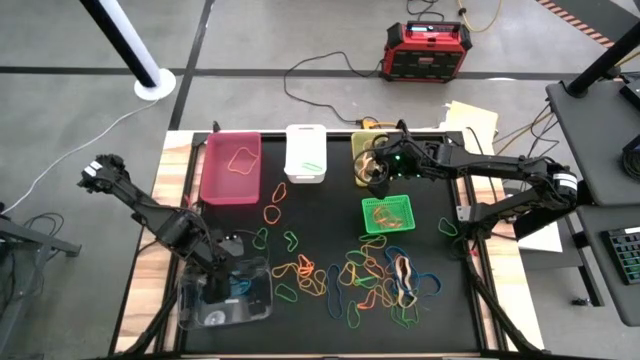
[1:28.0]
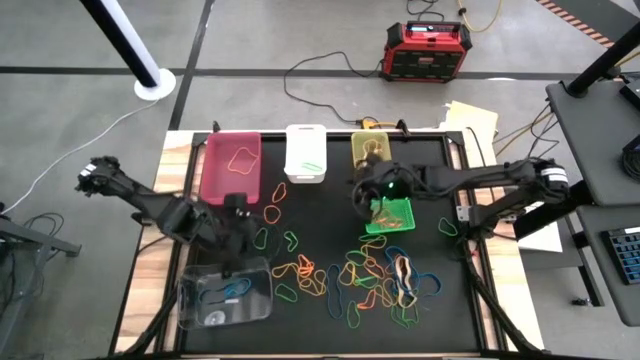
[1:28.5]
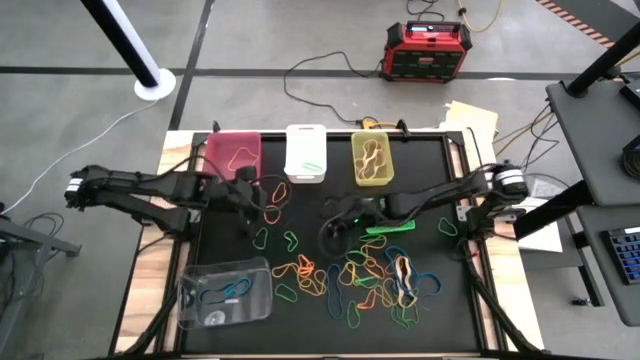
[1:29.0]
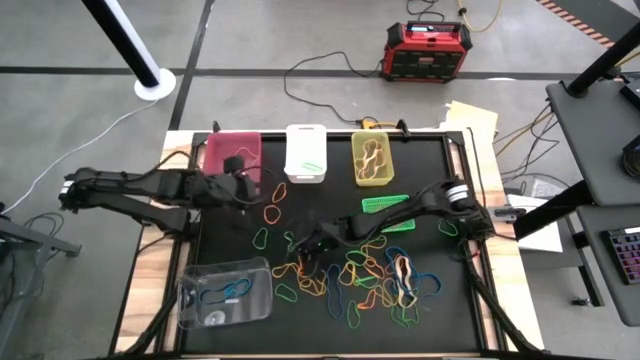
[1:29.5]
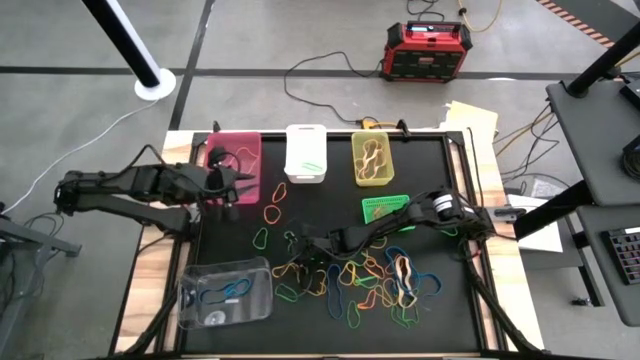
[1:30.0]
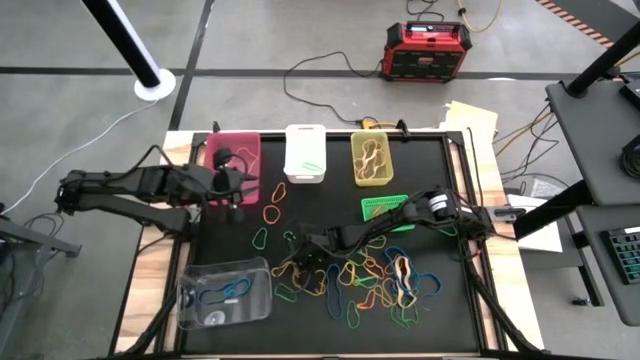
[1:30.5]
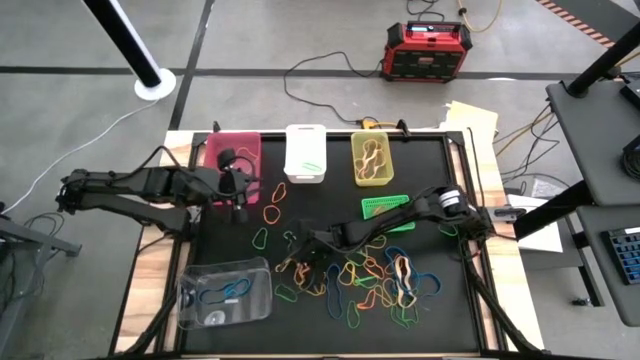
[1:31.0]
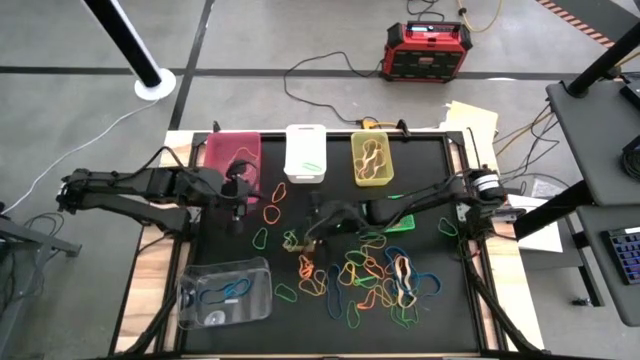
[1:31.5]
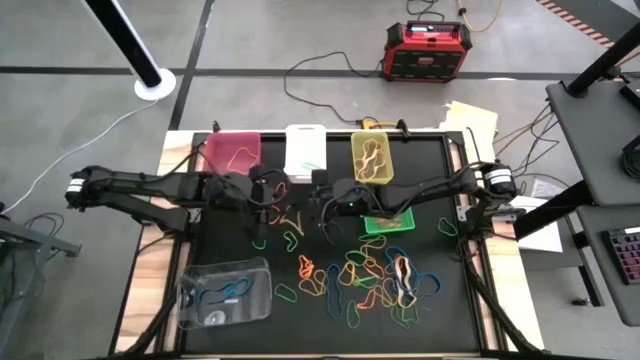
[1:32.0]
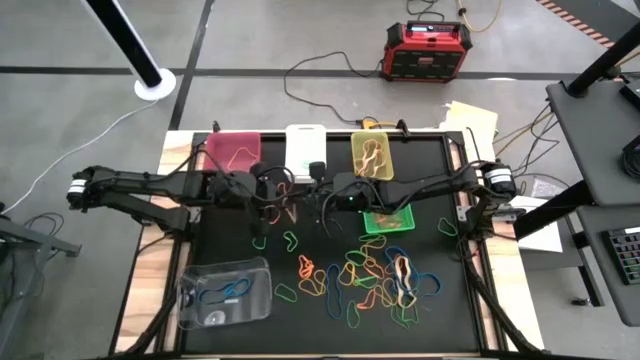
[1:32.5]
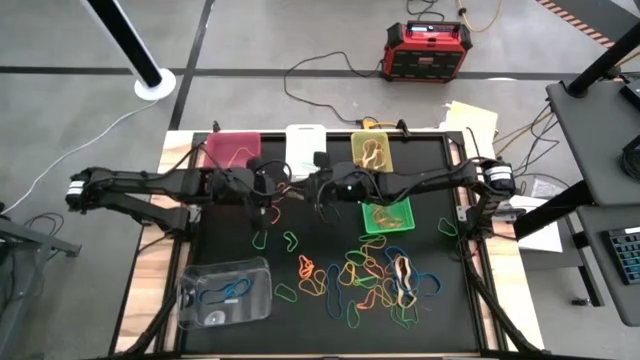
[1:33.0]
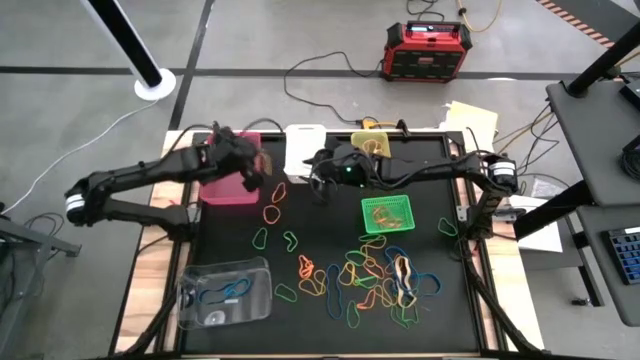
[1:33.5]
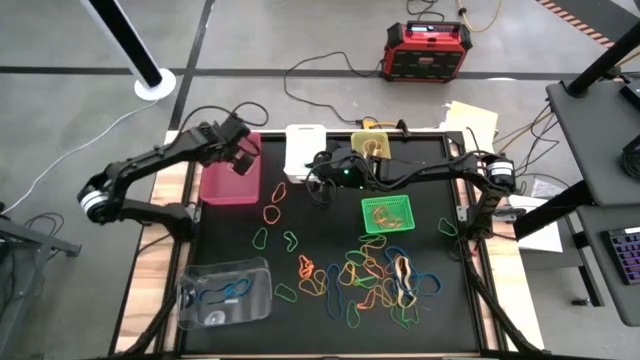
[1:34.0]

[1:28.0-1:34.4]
Task: Sort rubber bands into baskets
Put the yellow rubber band into the pink bin

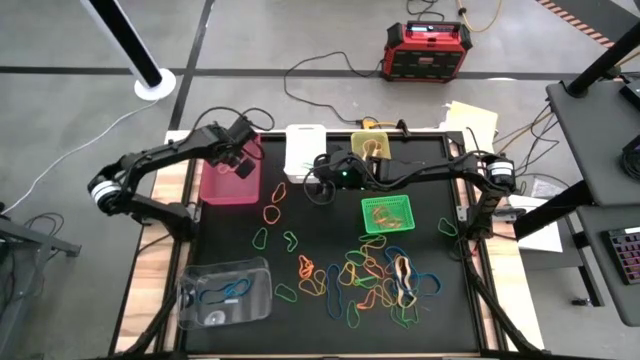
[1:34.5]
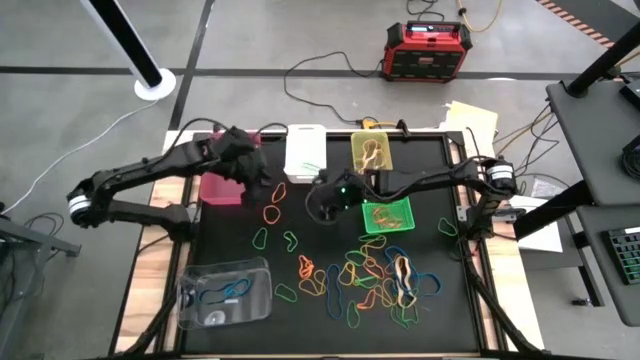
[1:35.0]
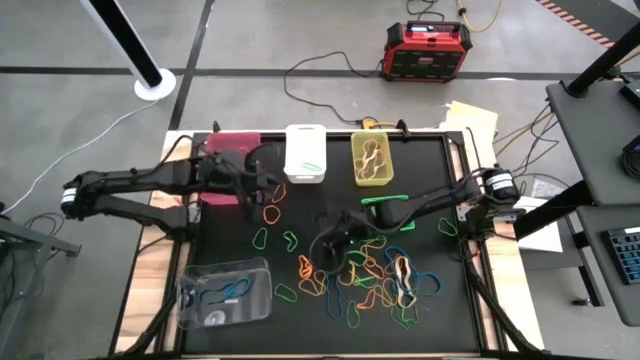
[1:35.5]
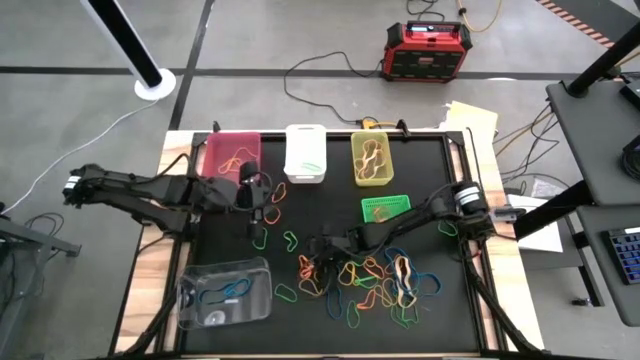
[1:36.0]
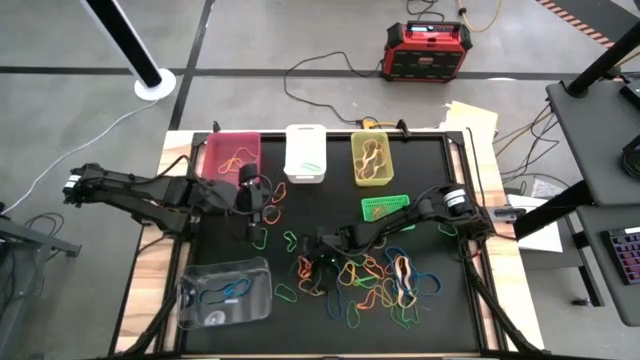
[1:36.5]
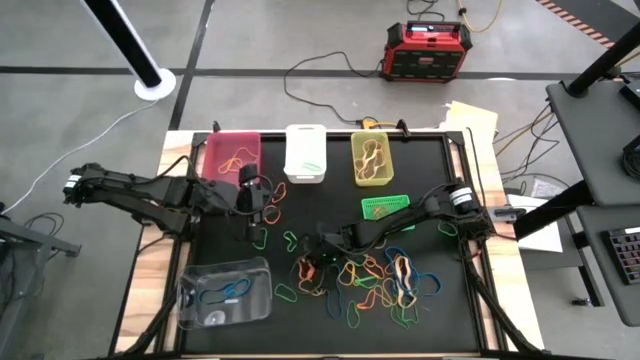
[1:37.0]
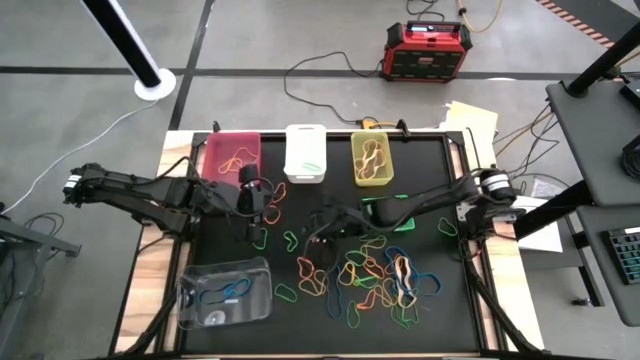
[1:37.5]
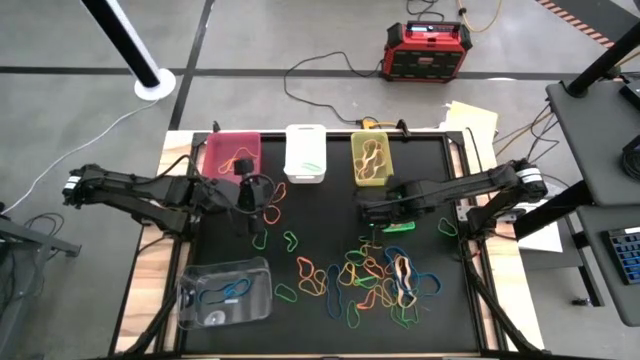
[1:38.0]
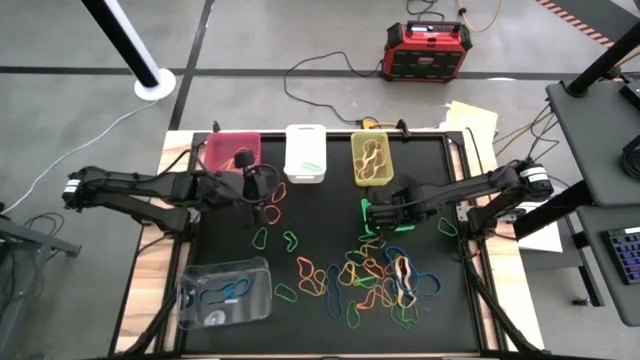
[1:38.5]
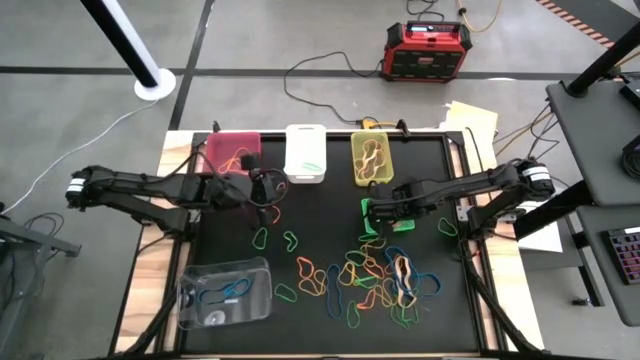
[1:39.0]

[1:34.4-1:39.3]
Put the orange rubber band into the green bin

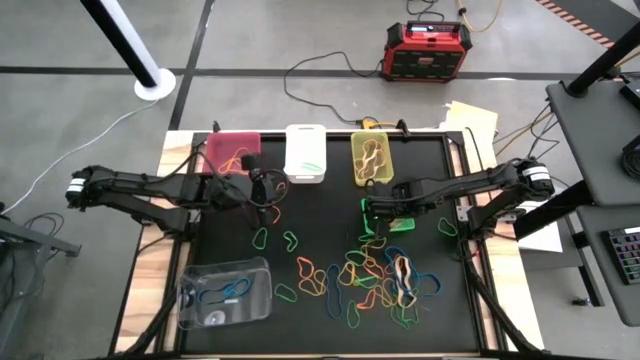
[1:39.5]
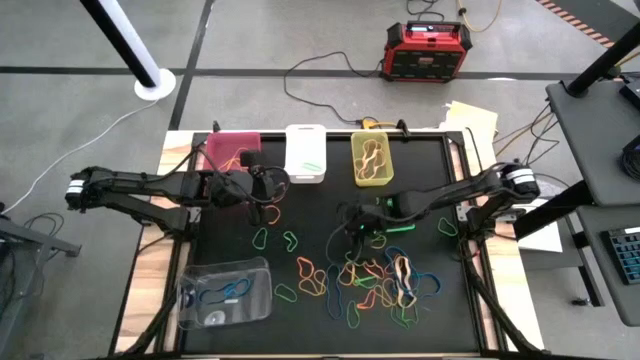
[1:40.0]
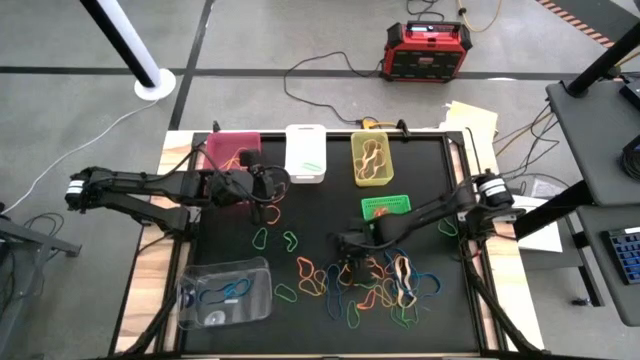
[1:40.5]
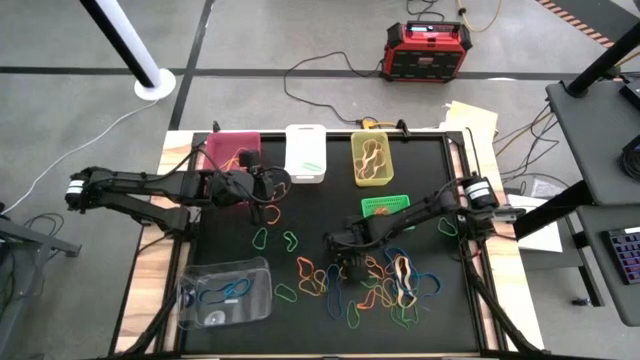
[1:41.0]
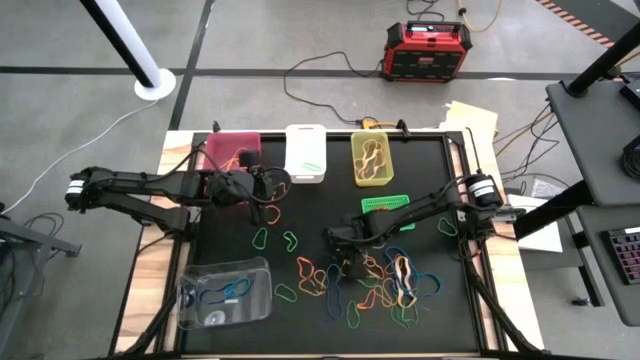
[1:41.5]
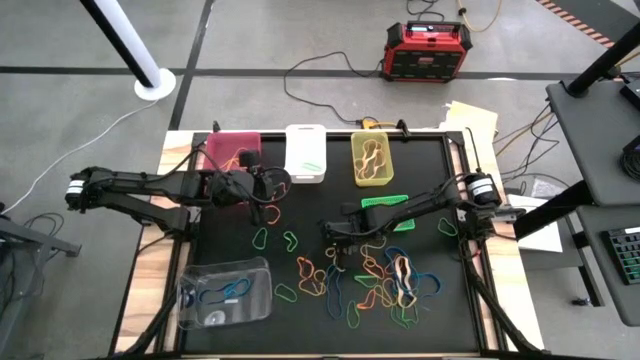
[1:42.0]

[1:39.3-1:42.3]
Put the green rubber band into the white bin

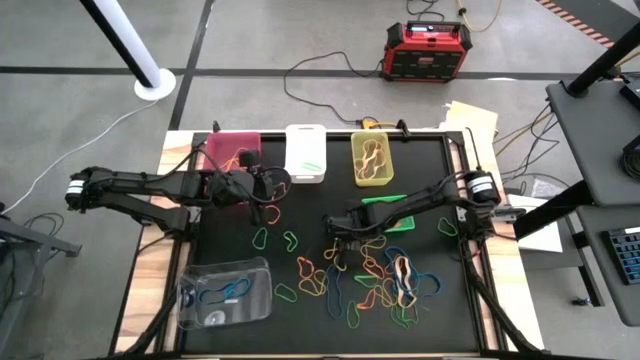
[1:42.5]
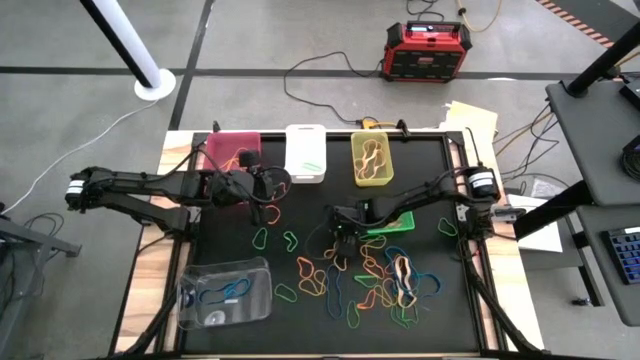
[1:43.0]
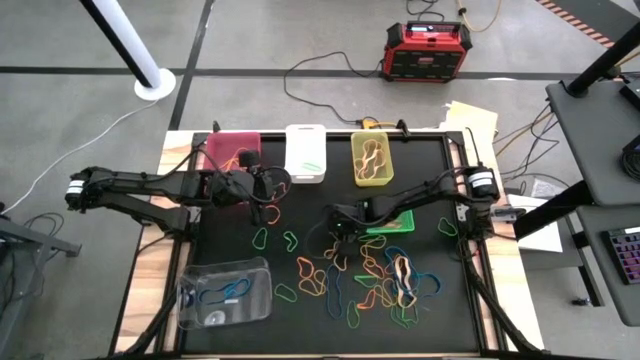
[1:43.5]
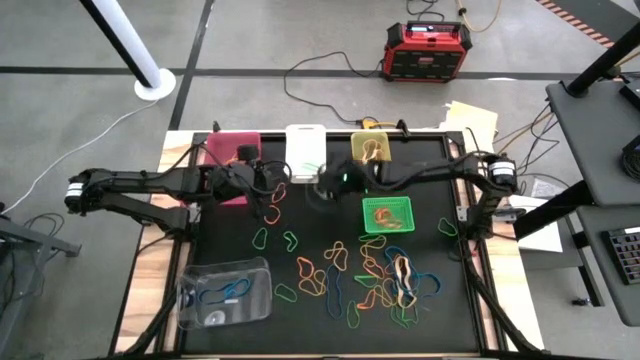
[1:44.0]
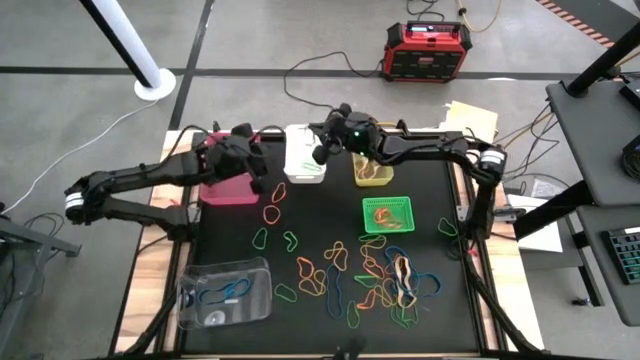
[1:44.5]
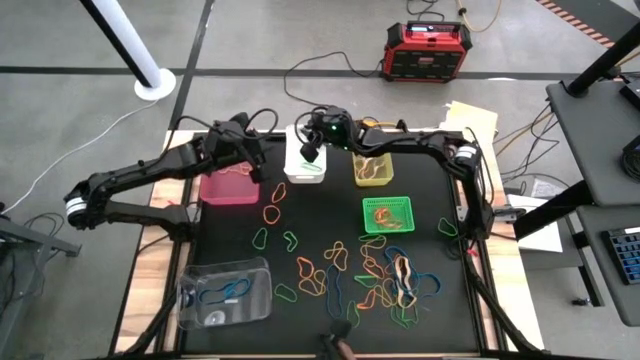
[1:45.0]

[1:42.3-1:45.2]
Put the green rubber band into the white bin

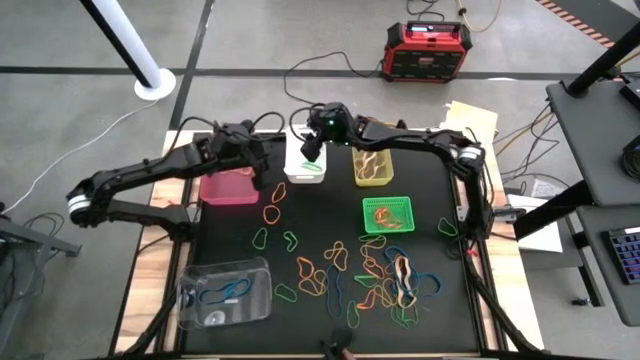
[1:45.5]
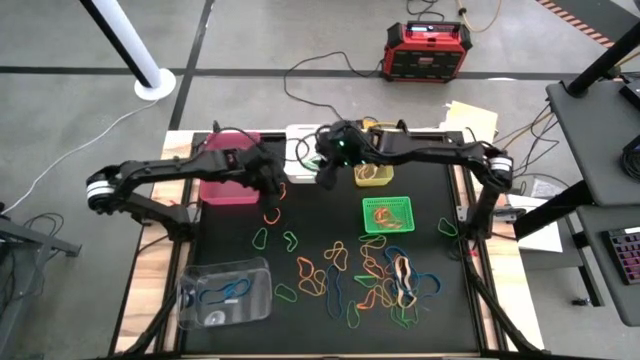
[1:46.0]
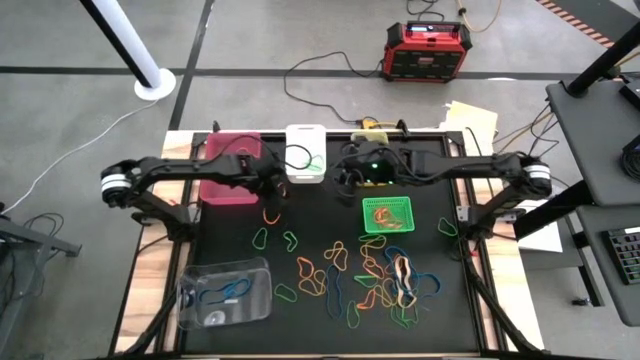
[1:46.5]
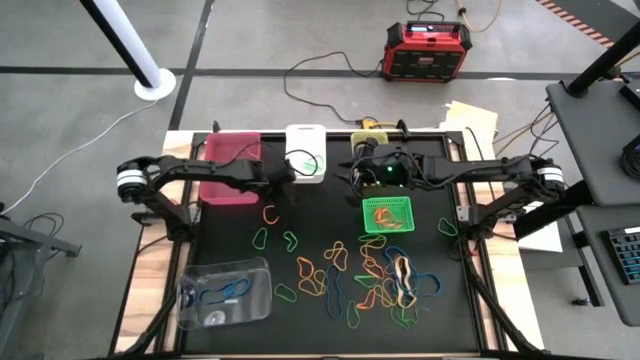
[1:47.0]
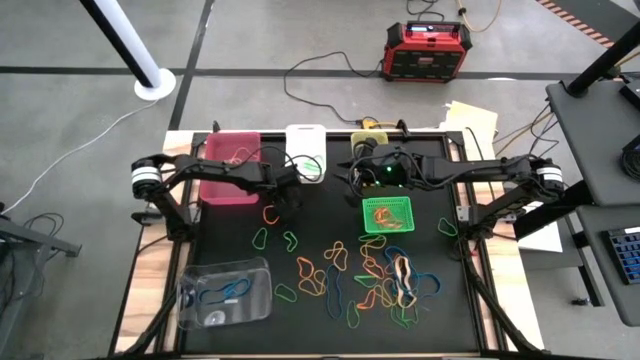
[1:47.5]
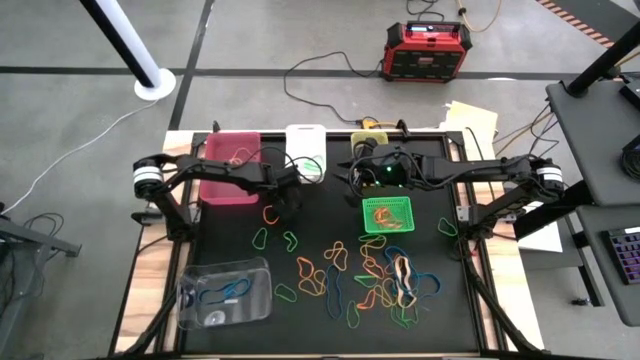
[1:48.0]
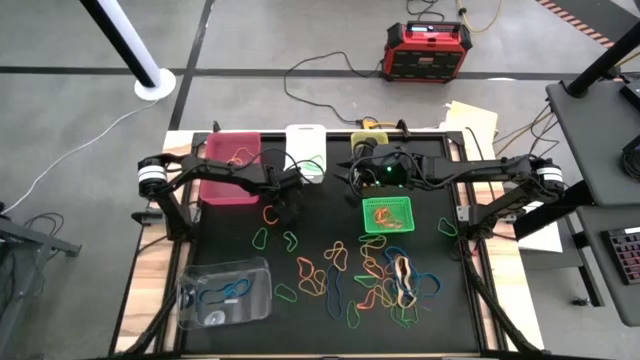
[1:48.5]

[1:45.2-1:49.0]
Put the orange rubber band into the green bin
